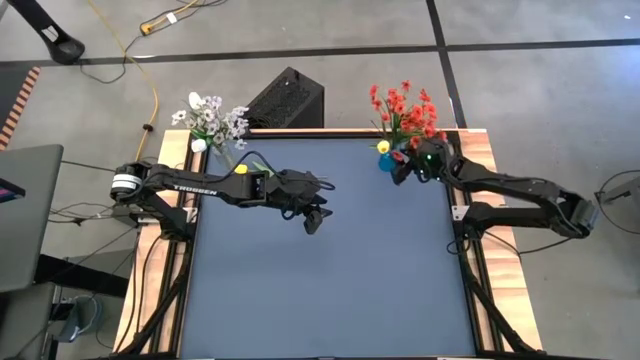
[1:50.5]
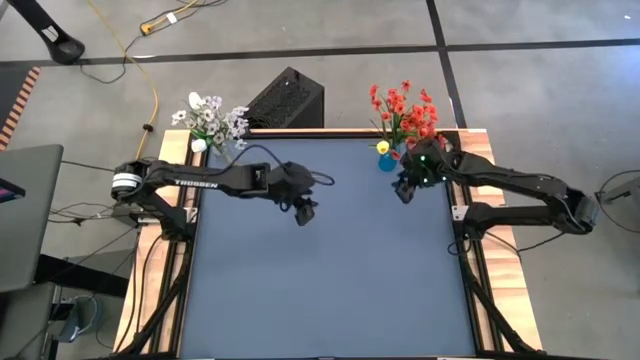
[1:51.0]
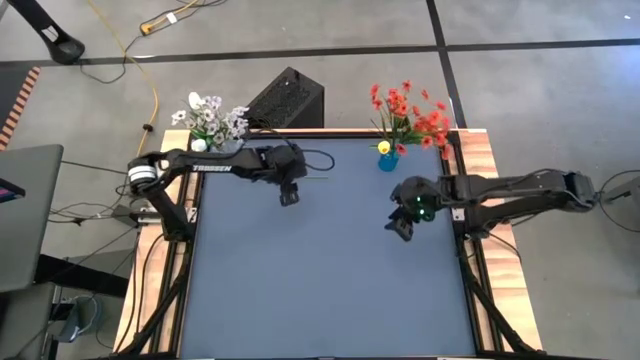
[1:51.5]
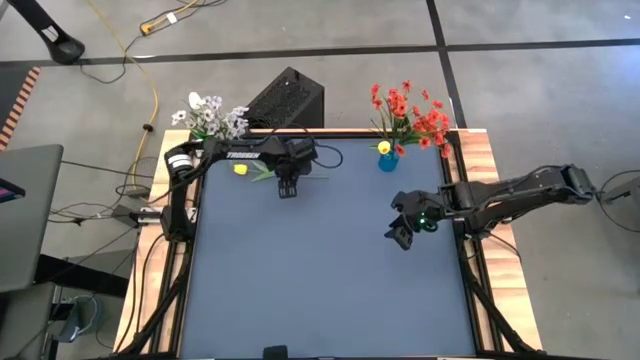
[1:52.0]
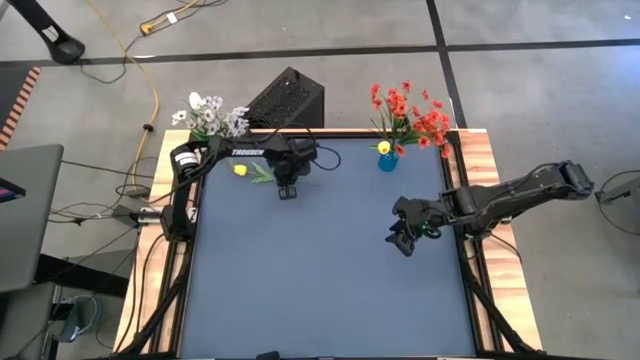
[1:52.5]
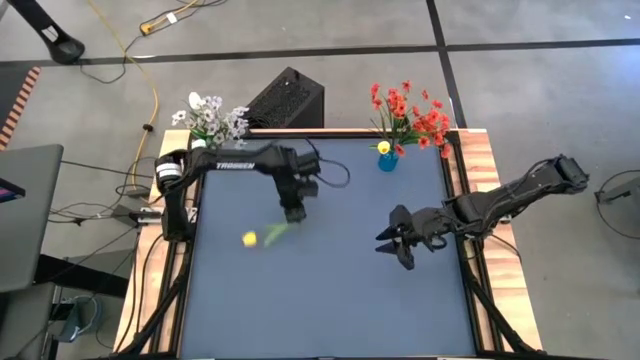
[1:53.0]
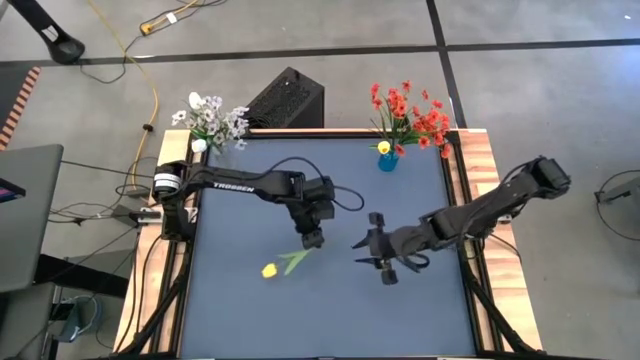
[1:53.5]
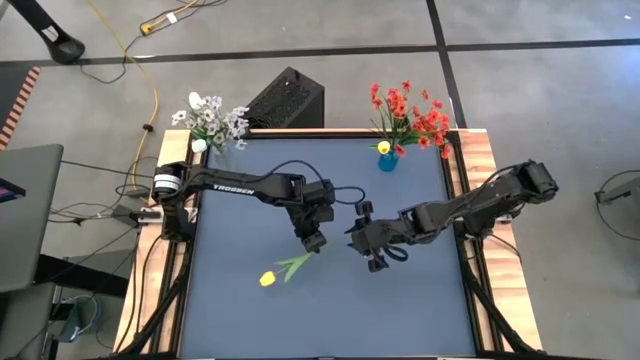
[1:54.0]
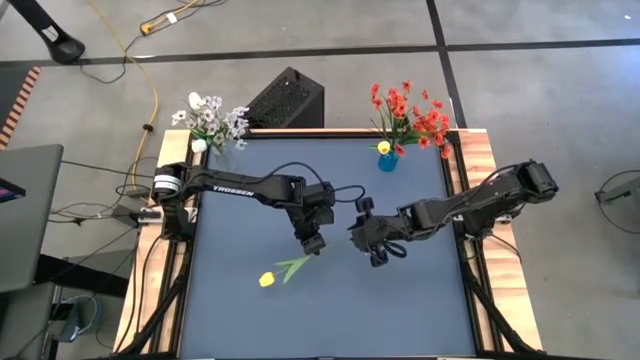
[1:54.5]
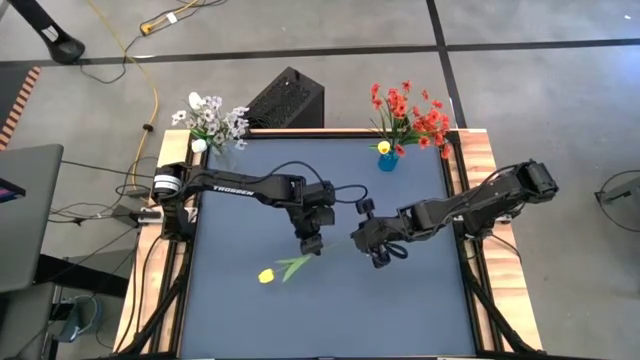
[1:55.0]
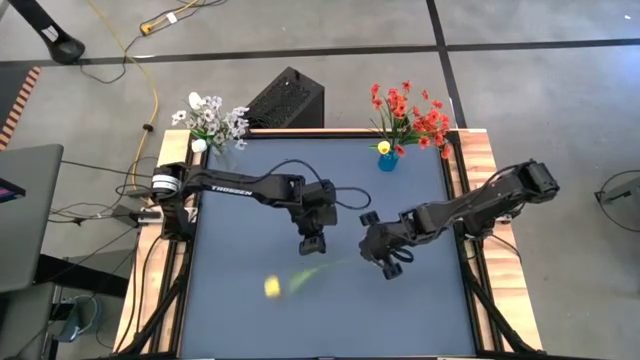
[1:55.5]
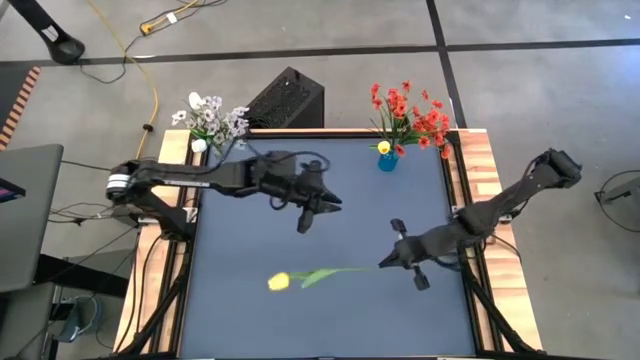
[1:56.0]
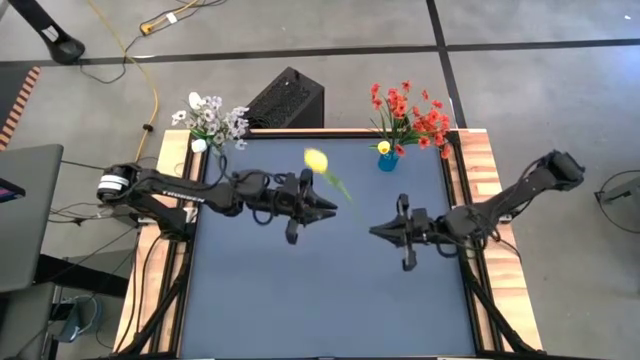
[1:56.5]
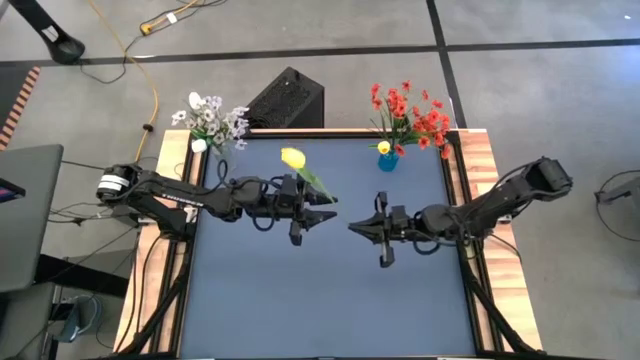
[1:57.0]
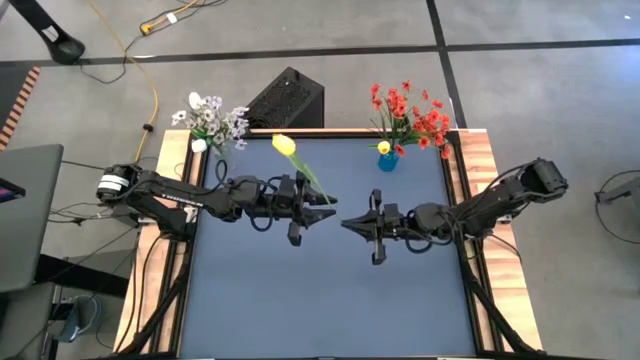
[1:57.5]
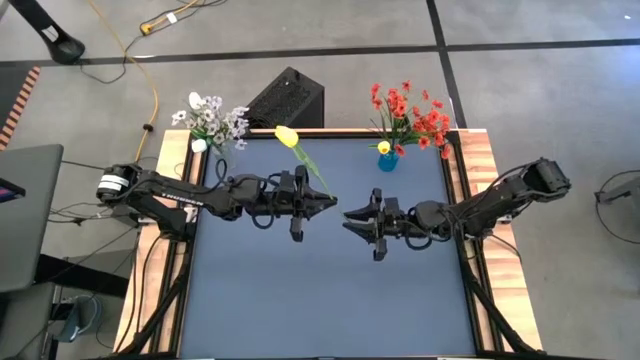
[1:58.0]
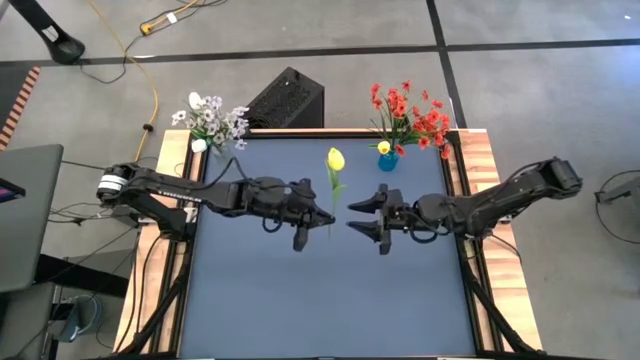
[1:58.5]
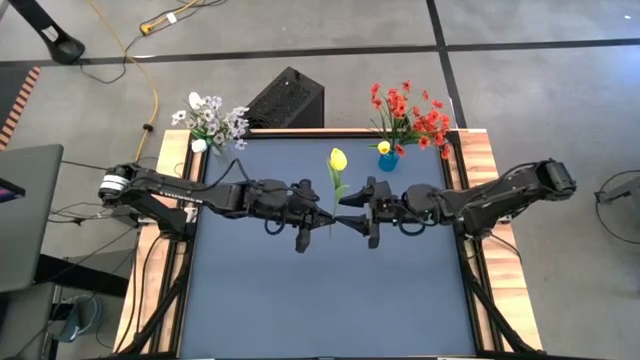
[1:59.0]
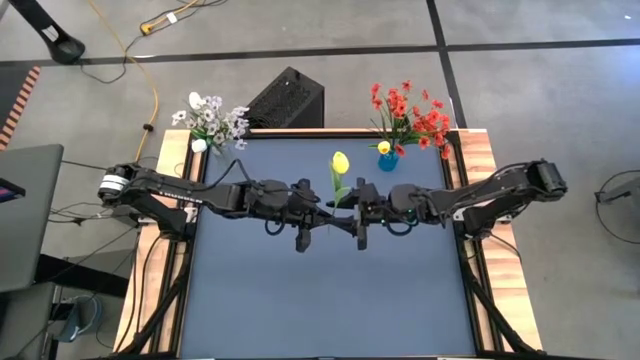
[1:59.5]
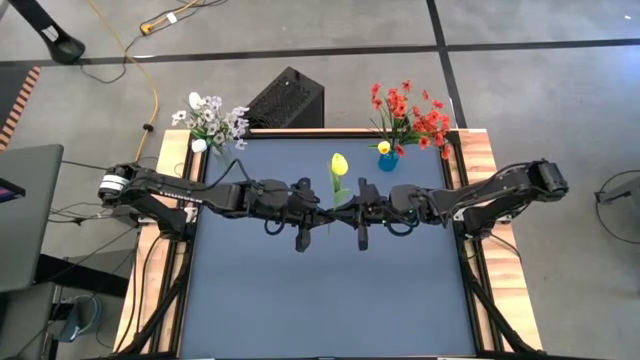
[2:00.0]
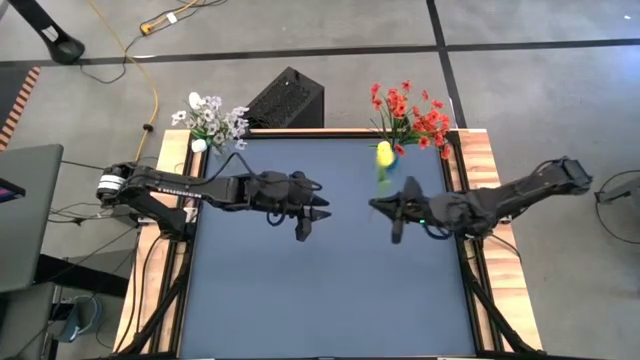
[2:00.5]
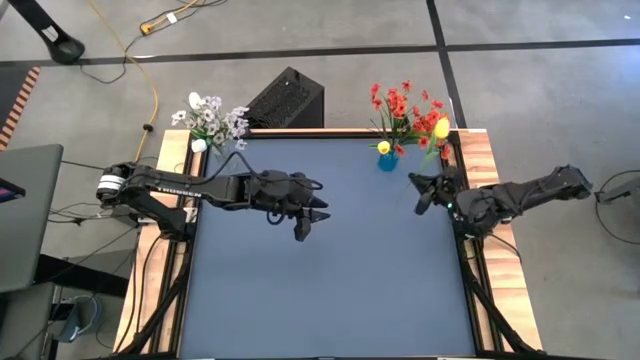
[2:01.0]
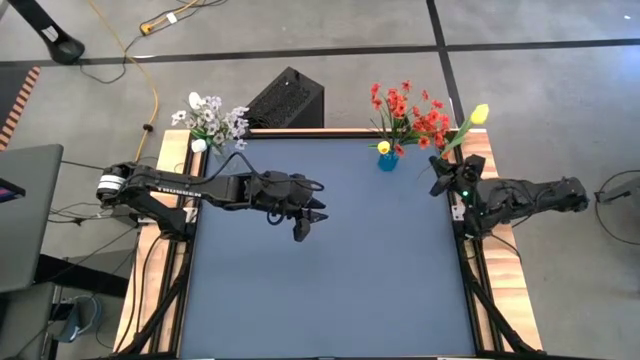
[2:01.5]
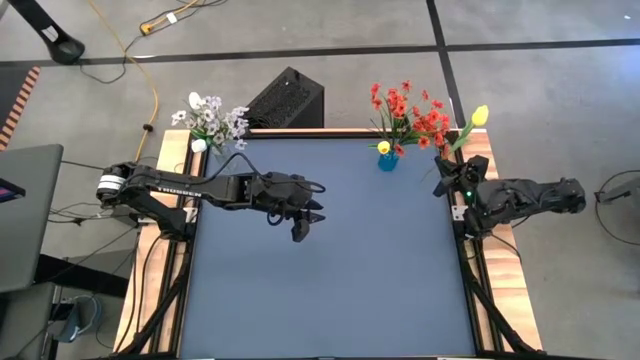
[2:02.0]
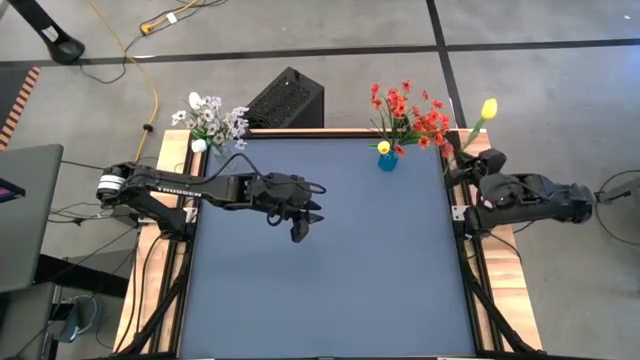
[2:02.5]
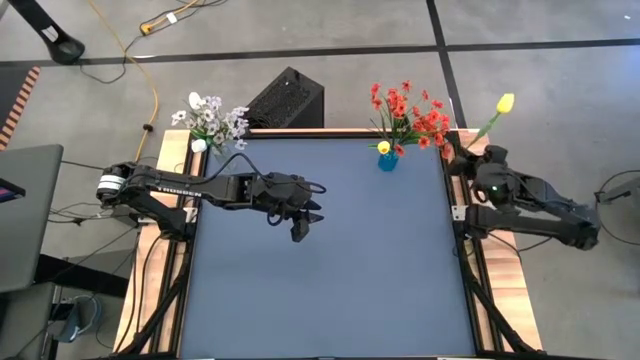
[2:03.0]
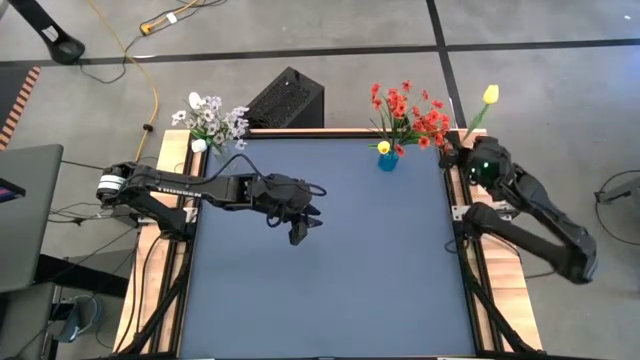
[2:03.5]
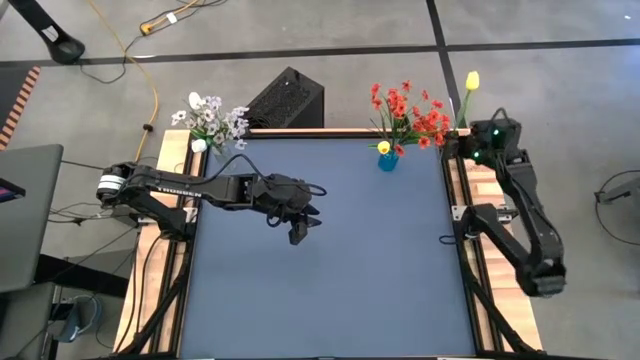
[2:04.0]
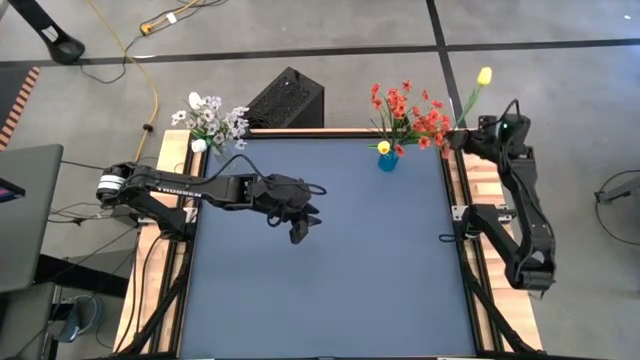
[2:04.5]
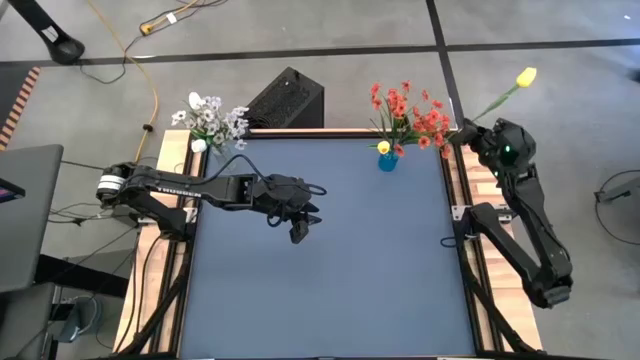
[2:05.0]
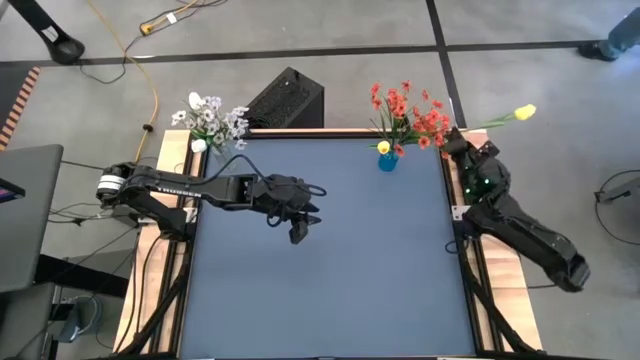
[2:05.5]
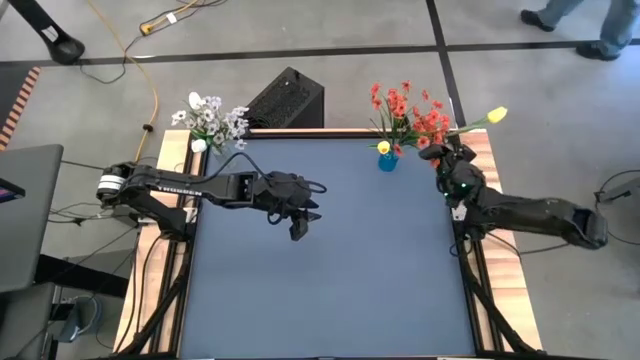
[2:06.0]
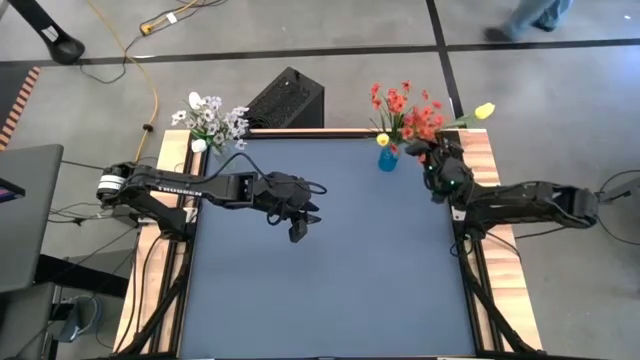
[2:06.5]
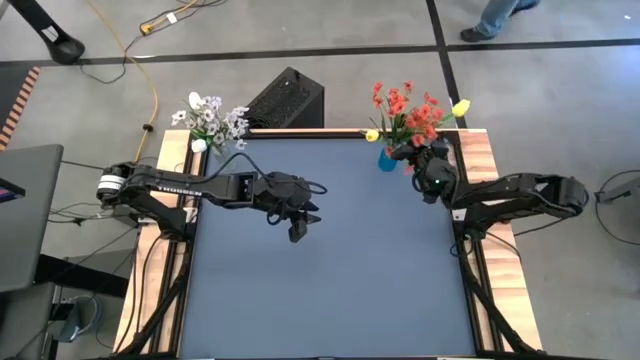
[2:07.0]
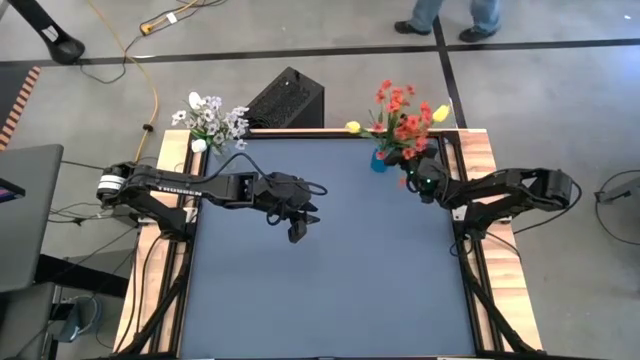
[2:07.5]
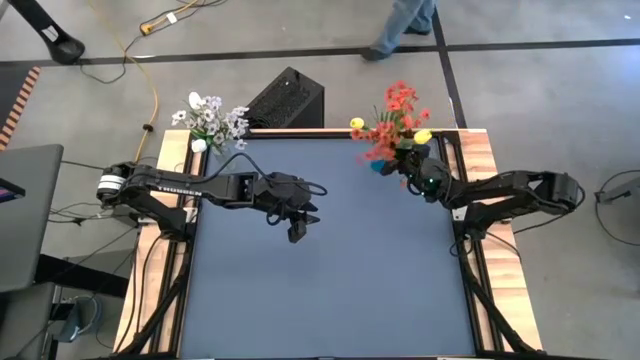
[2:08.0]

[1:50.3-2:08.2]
Task: Sort flowers into vase by color
Put the yellow flower into the blue vase

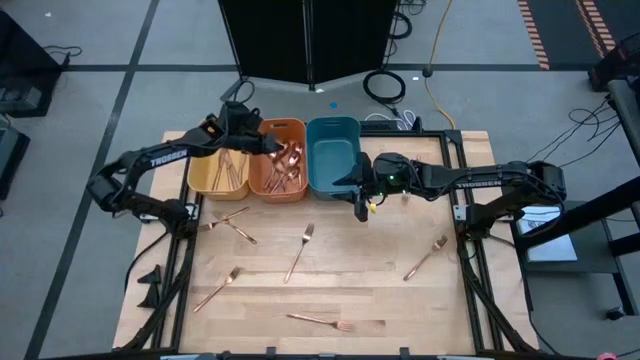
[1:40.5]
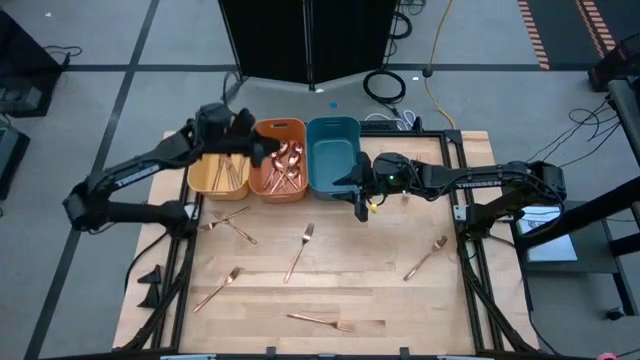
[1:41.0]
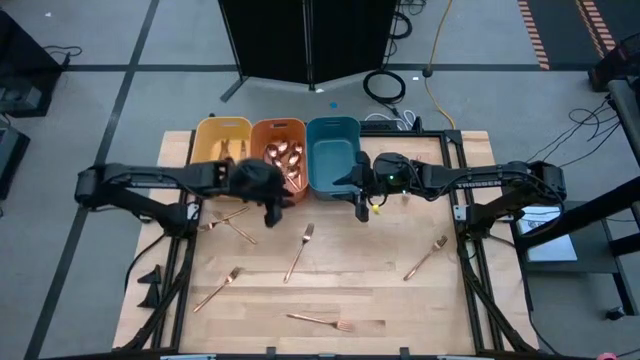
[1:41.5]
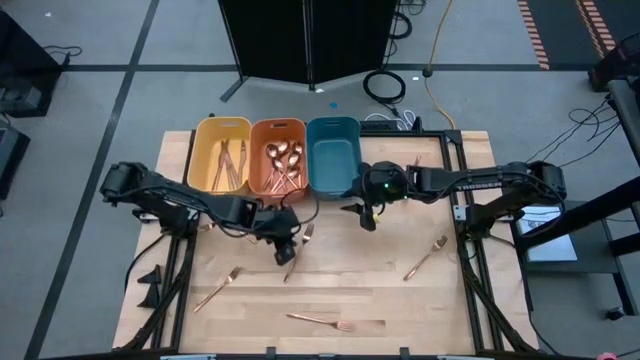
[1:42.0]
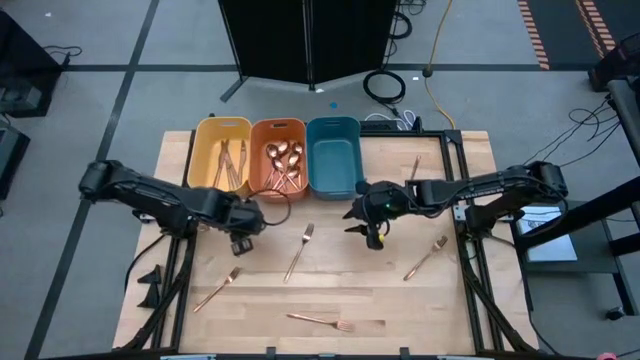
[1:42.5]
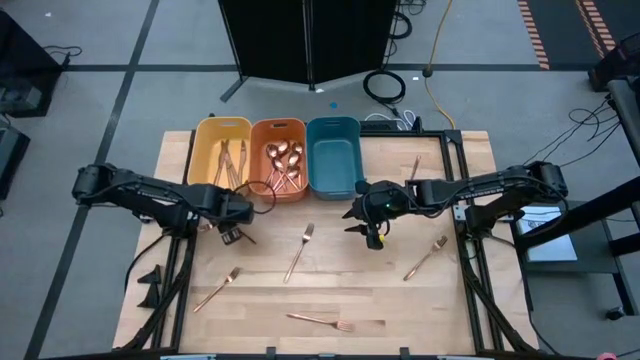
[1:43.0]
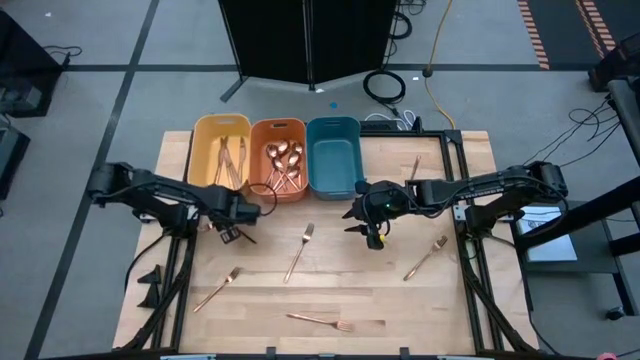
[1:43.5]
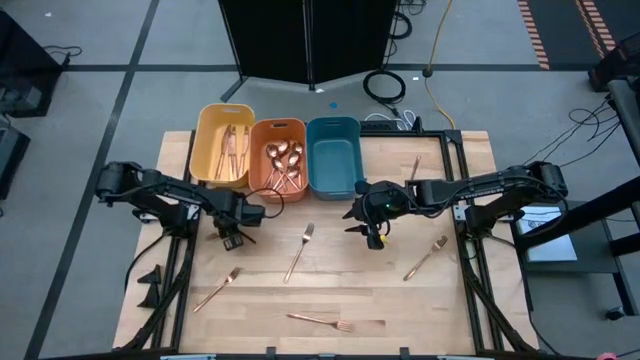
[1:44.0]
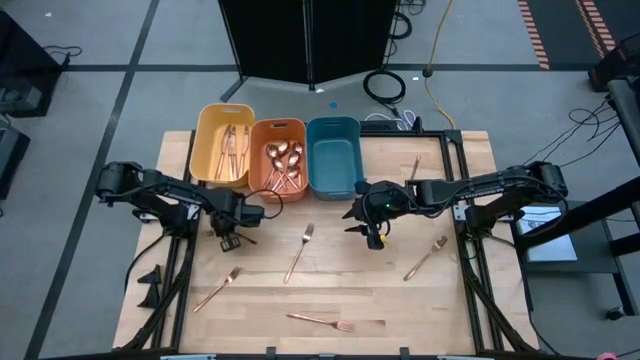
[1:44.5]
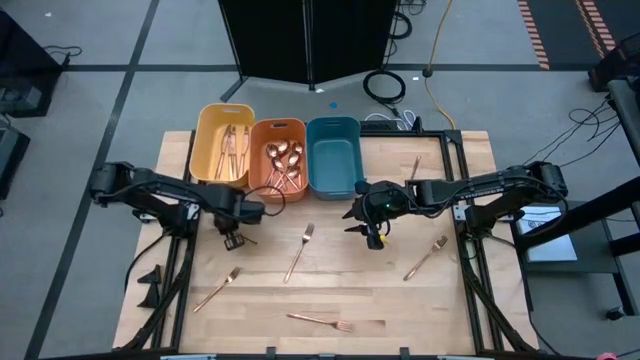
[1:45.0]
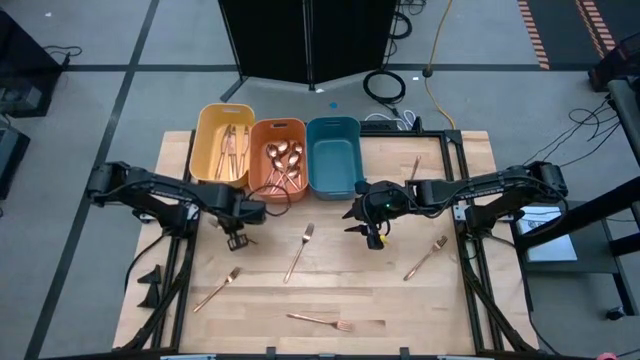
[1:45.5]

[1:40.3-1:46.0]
Task: Sort silverware
Put the gold fork into the blue bin
